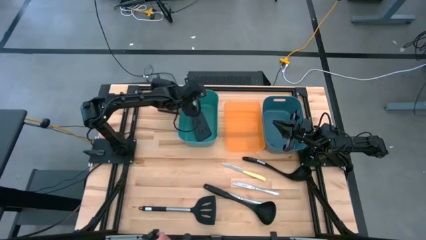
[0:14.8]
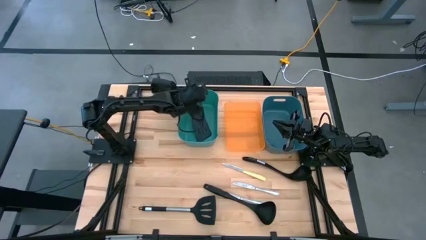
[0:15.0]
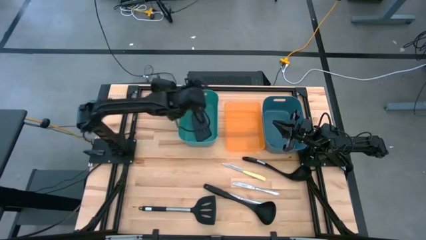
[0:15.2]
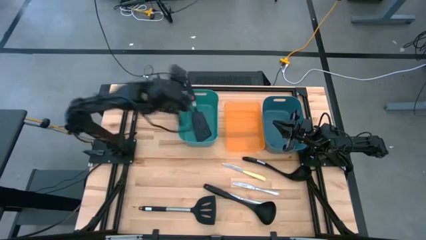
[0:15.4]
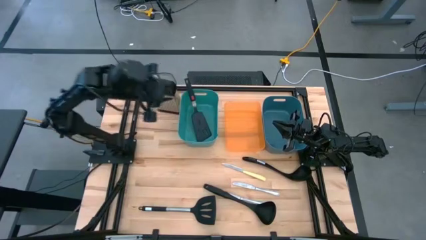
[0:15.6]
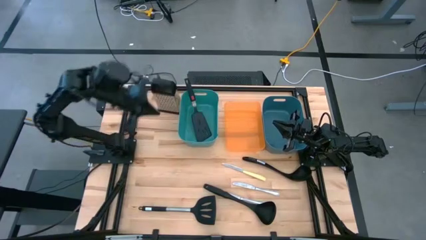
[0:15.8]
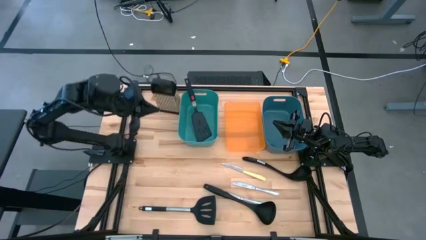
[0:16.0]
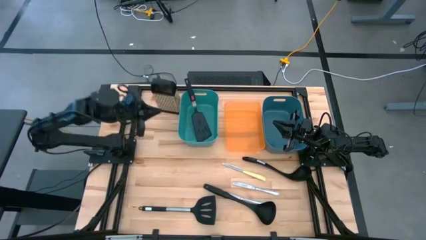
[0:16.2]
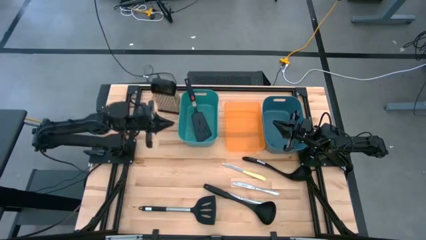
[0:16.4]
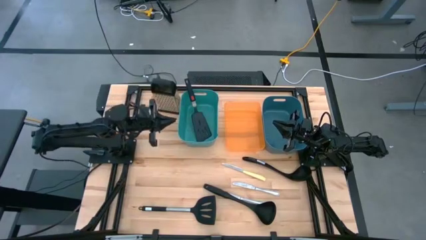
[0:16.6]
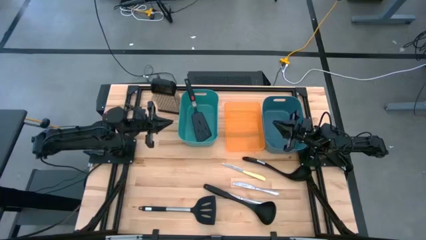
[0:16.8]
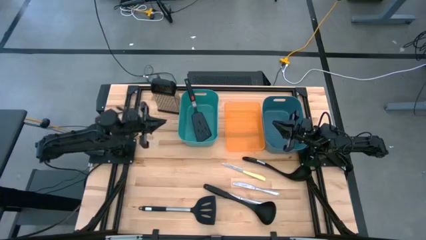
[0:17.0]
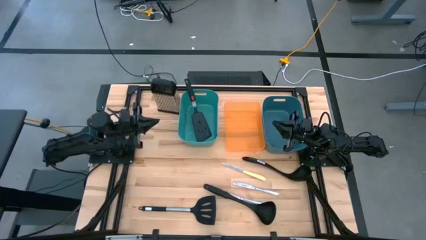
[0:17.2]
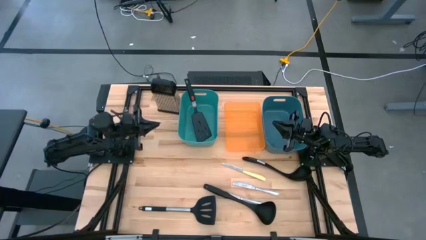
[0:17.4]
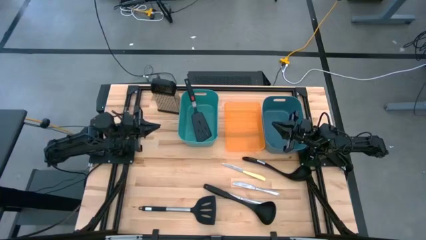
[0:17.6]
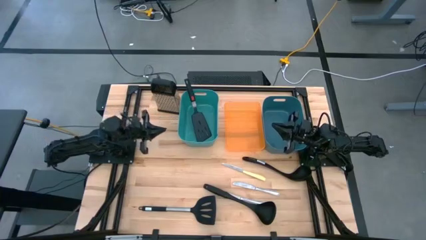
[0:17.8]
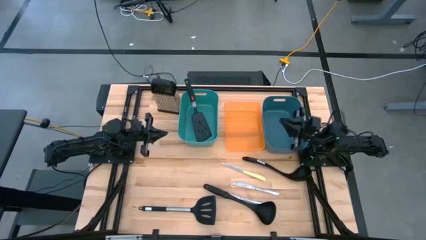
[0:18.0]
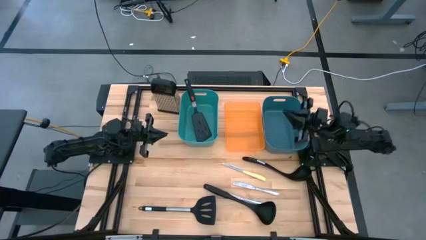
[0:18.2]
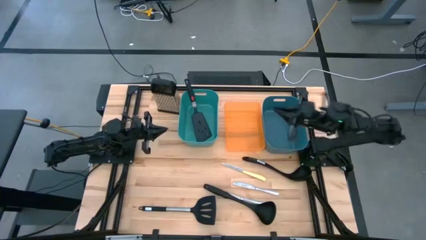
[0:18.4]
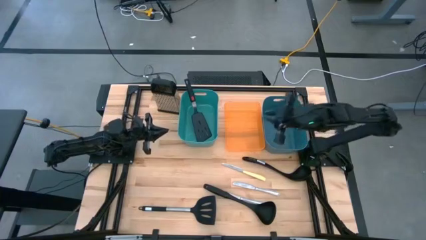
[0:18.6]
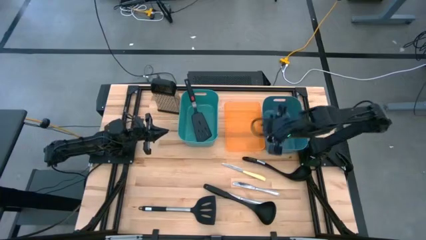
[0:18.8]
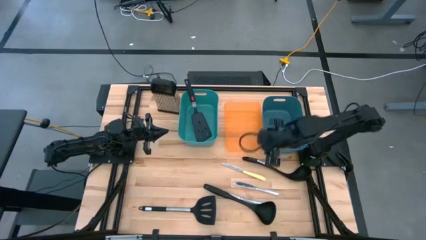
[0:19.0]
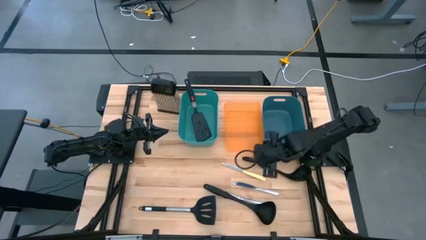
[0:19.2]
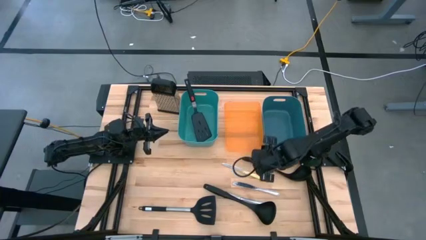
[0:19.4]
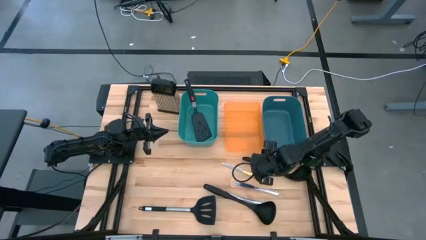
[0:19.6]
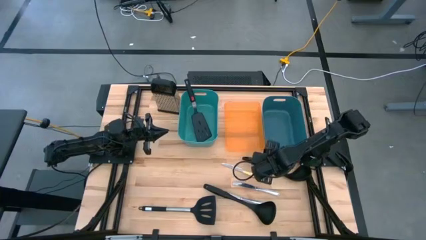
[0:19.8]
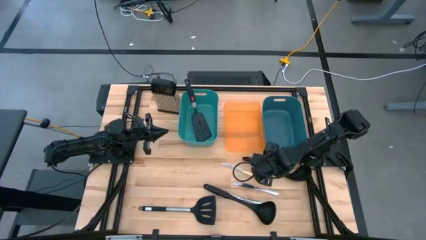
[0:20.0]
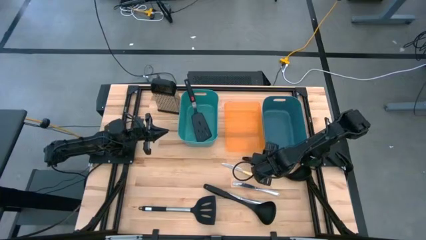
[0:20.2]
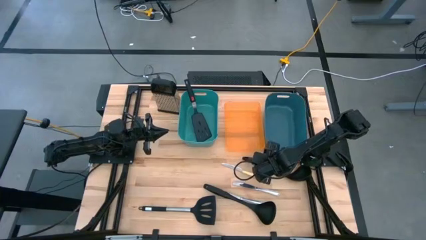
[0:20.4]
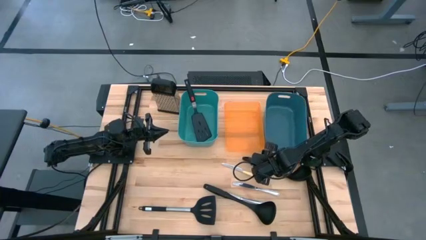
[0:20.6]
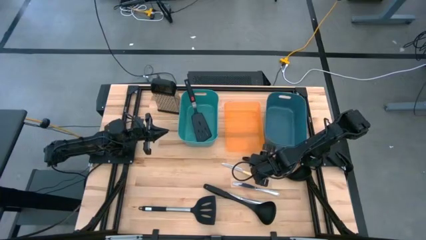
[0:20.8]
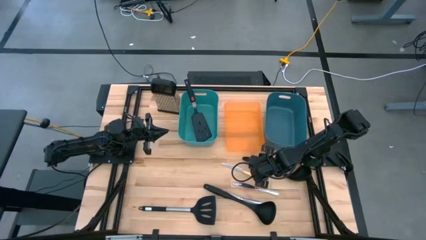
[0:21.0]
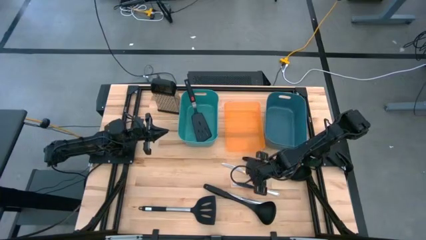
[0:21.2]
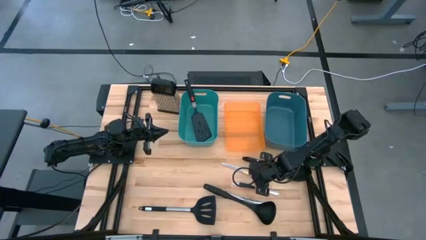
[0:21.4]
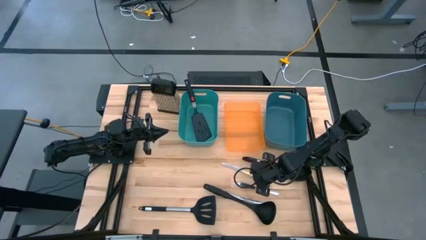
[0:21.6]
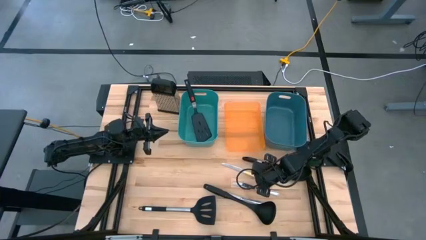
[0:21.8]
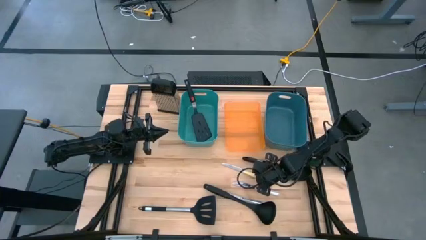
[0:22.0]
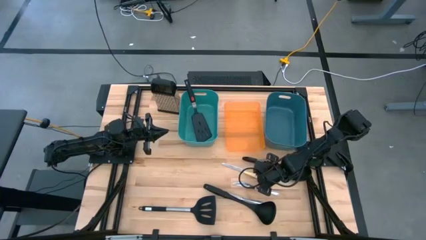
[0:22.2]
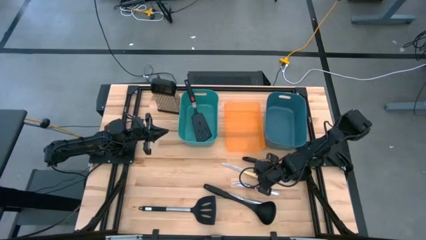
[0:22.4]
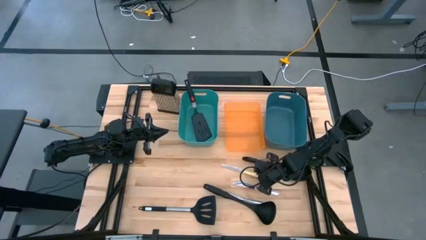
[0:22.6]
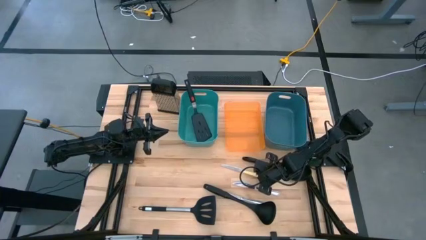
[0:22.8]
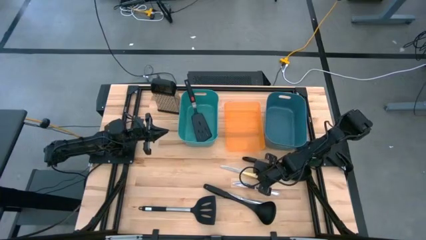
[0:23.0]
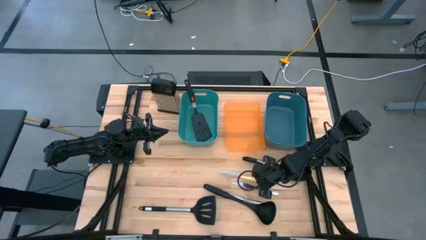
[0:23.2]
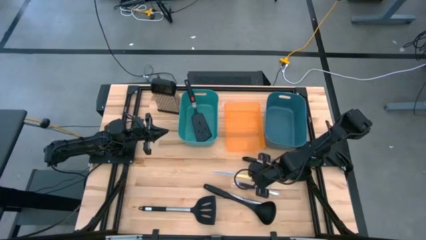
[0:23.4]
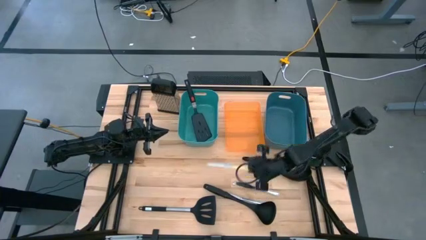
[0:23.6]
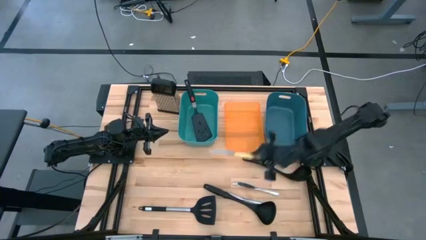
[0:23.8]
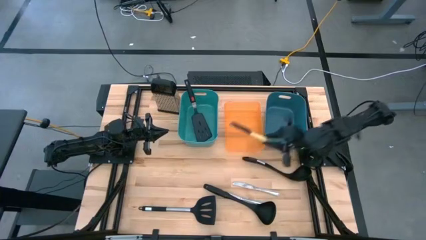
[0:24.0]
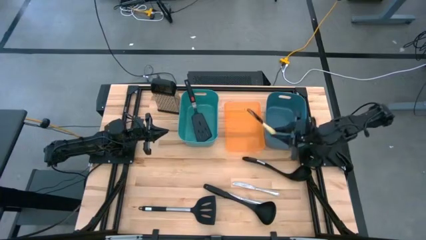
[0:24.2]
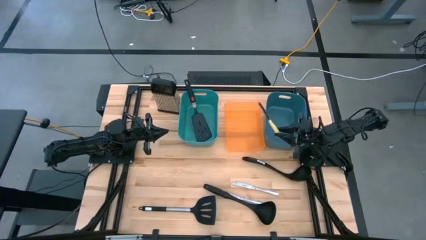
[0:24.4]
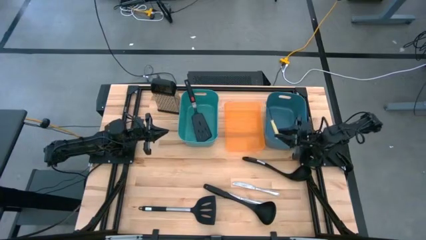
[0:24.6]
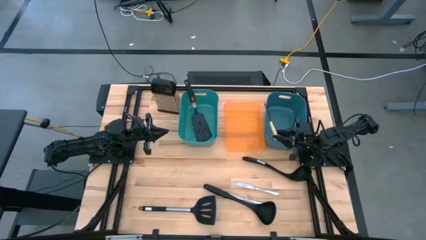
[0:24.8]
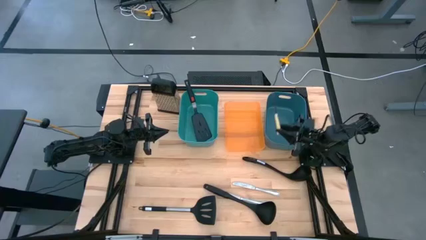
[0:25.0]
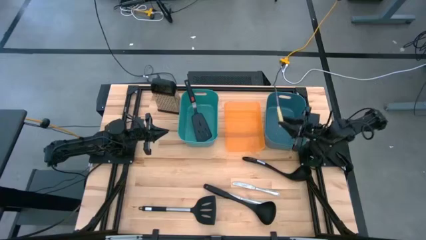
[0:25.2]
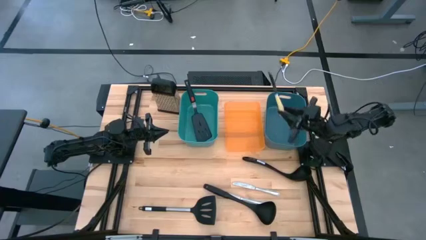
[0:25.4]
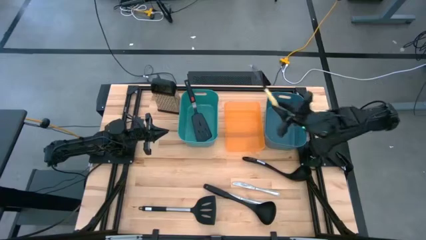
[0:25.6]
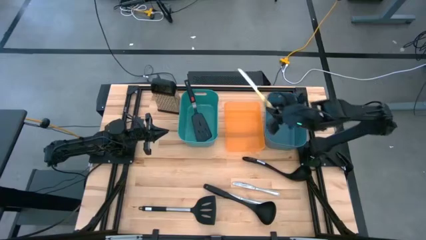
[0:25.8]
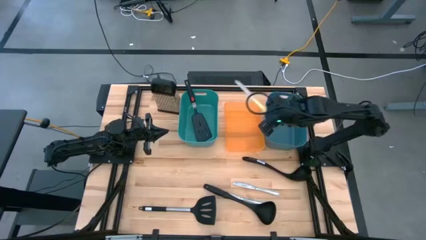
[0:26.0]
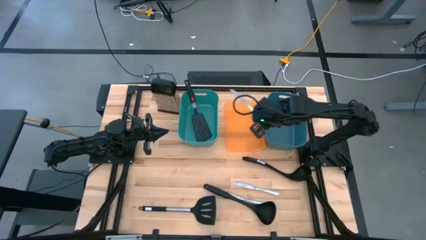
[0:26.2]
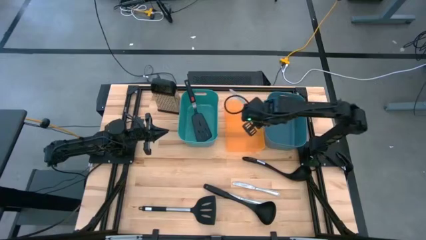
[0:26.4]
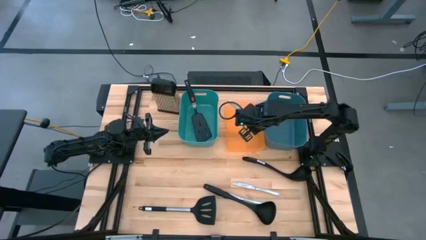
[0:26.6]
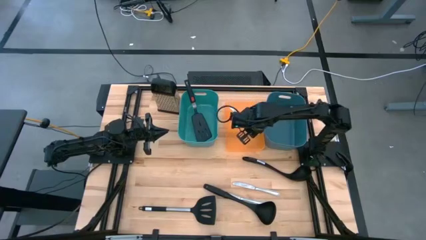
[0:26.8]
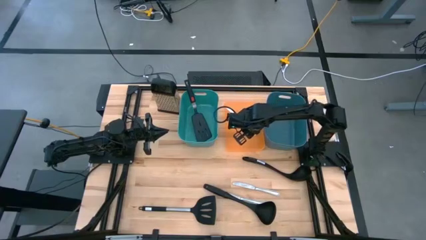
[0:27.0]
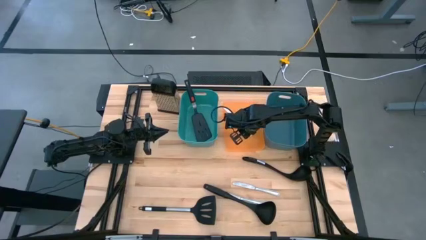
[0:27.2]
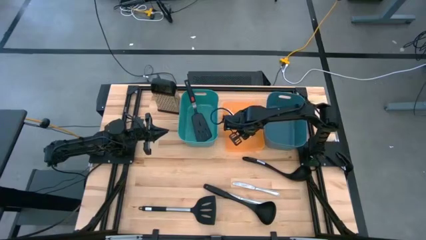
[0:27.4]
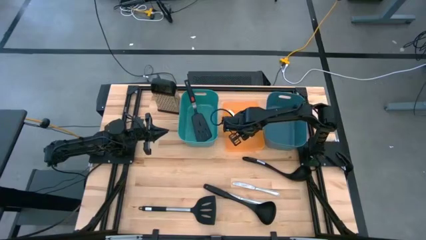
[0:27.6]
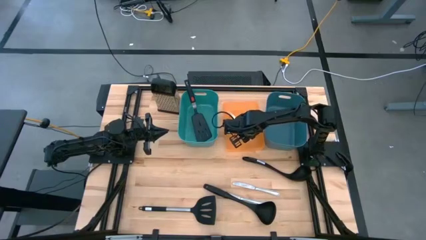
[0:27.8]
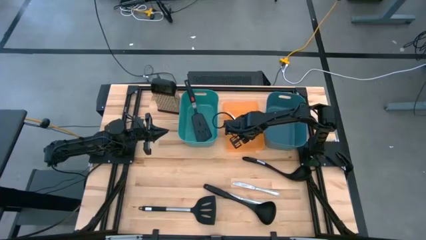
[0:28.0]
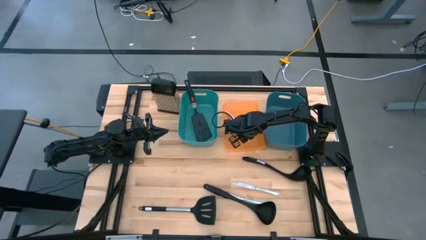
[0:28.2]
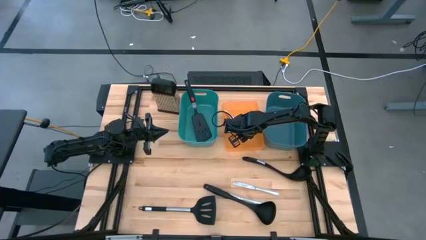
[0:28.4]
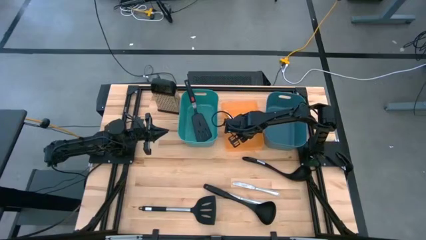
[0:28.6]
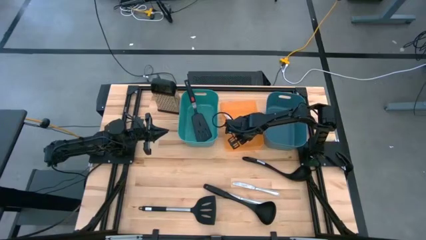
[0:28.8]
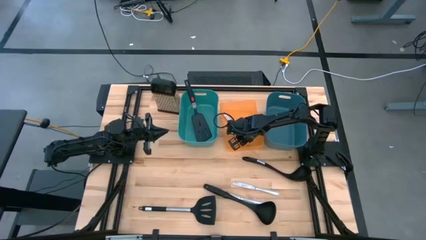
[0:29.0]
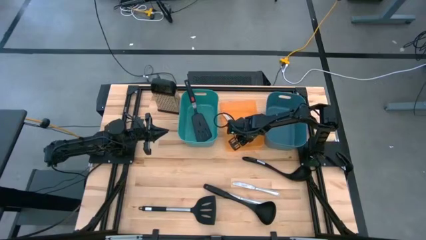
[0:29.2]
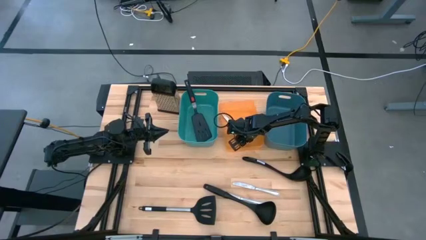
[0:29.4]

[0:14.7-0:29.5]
Task: Pick & Place Kitchen Items
Put the yellow table knife into the orange bin
